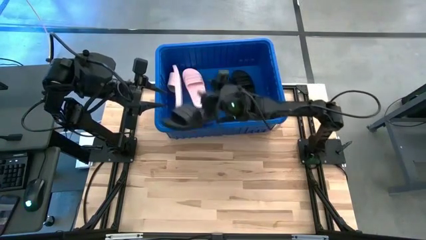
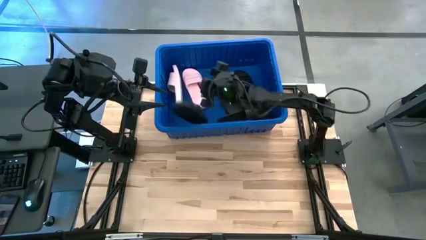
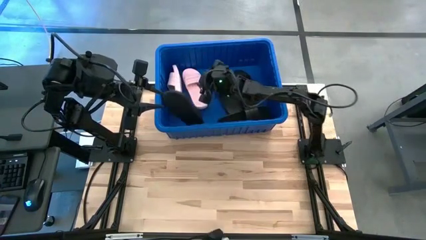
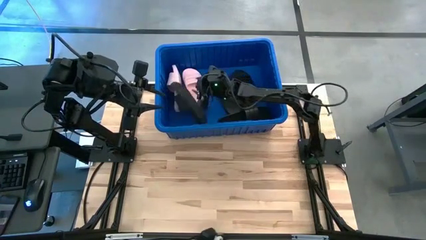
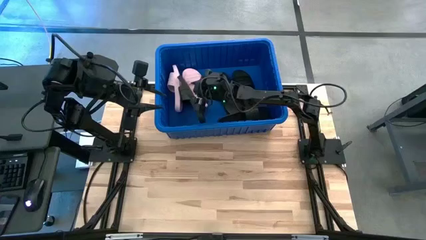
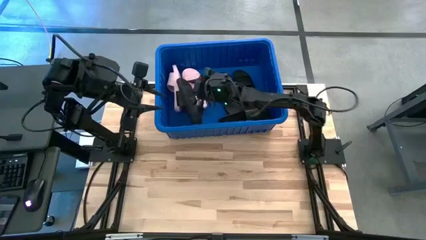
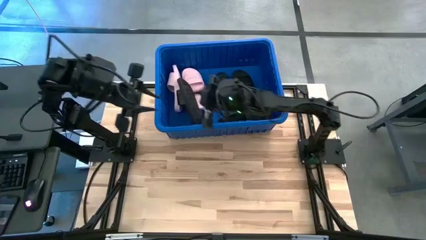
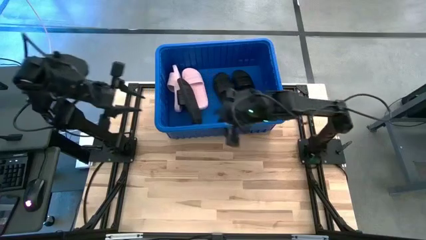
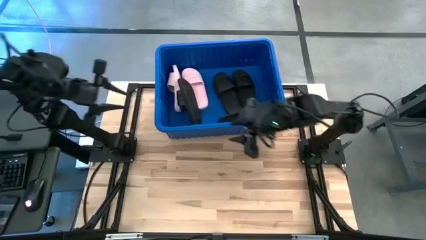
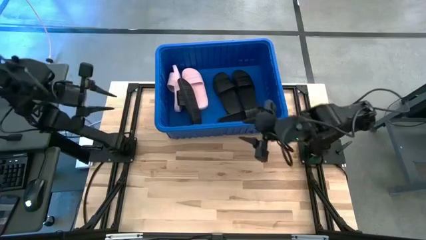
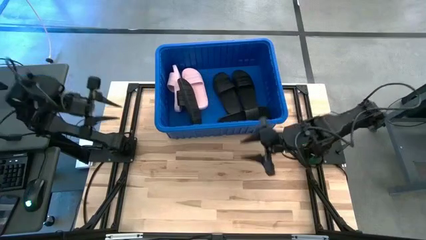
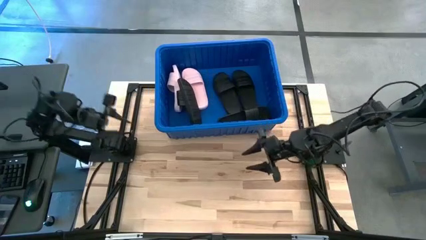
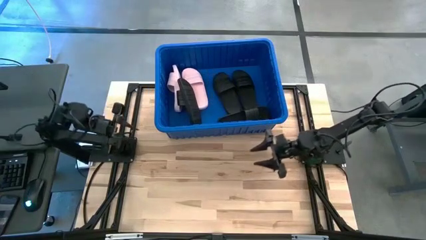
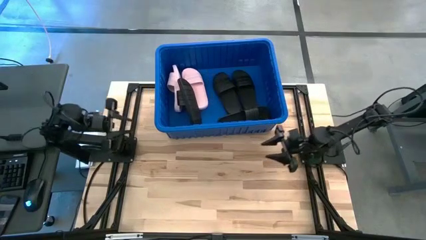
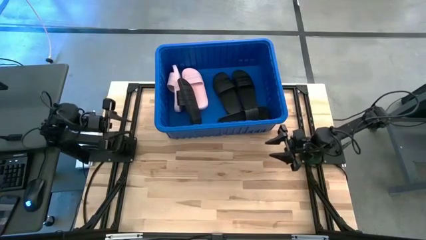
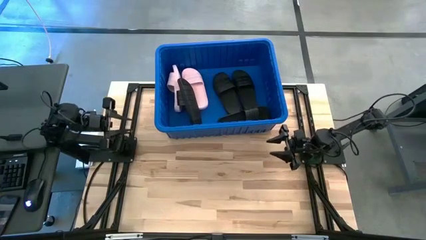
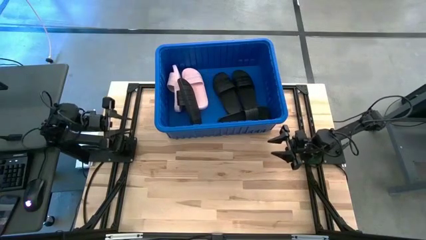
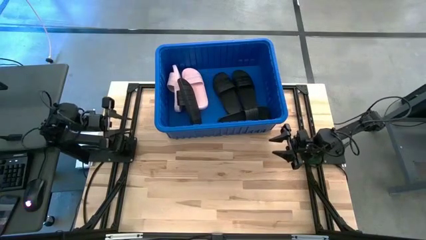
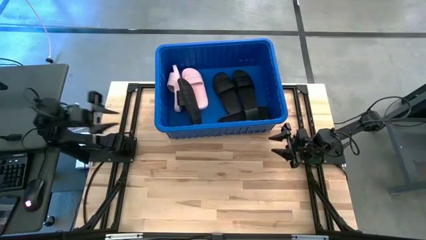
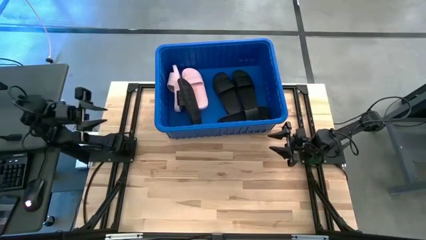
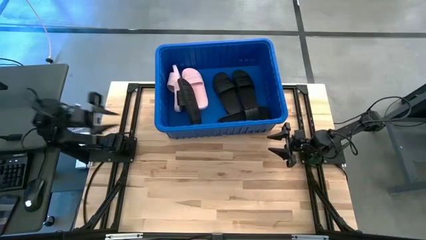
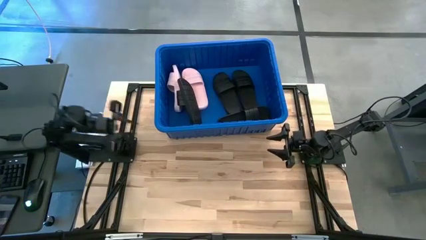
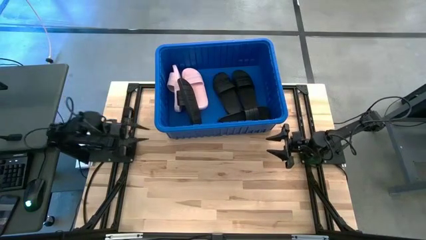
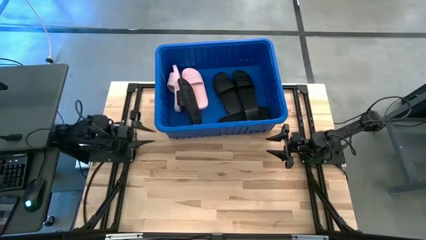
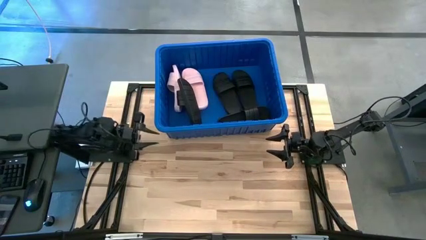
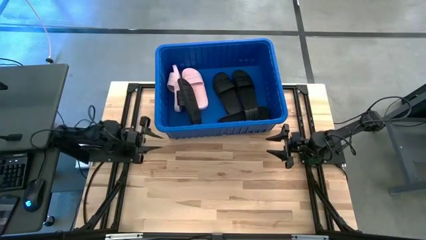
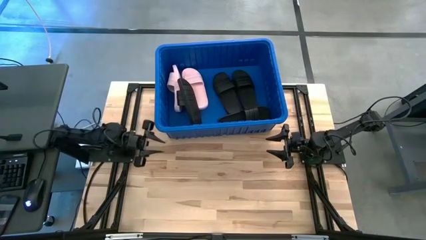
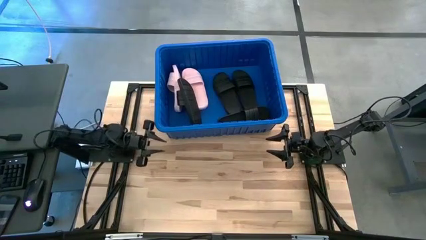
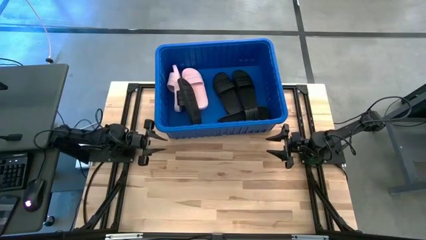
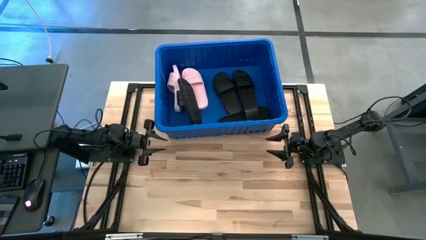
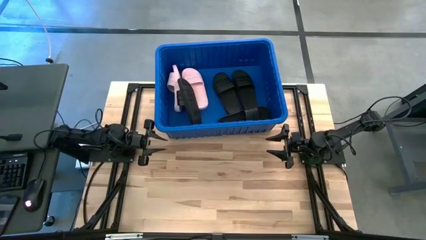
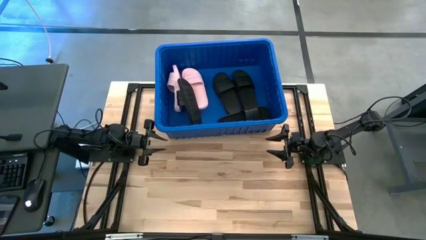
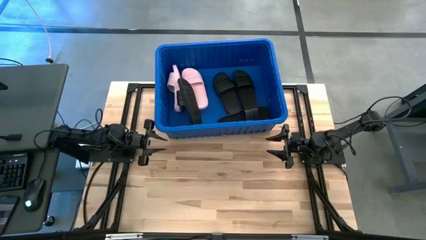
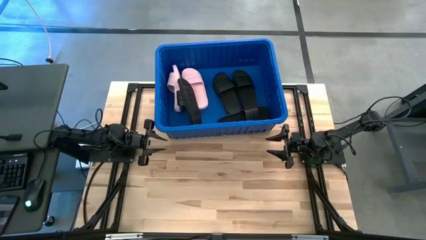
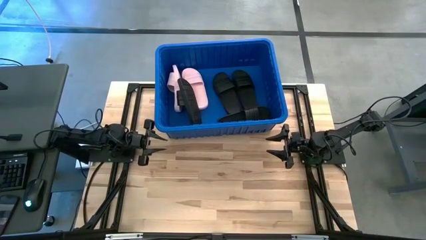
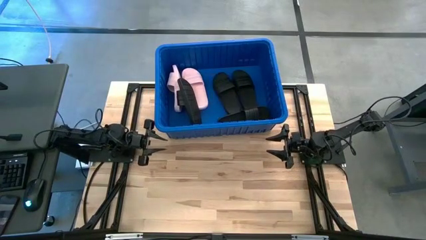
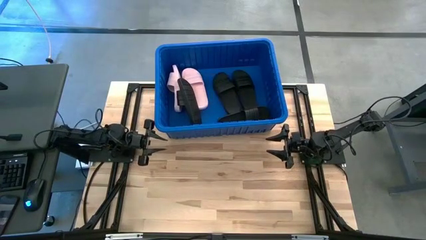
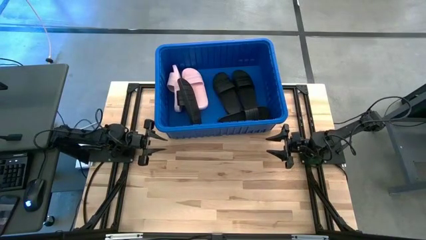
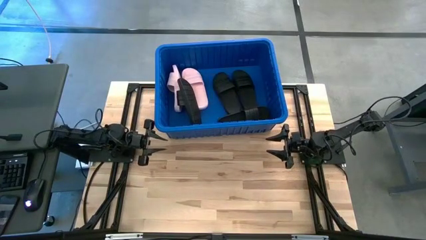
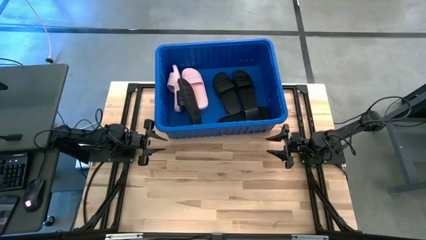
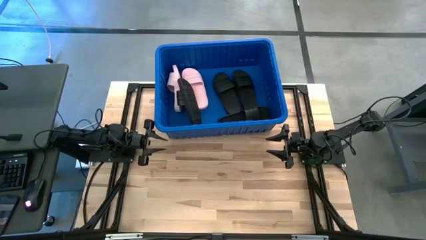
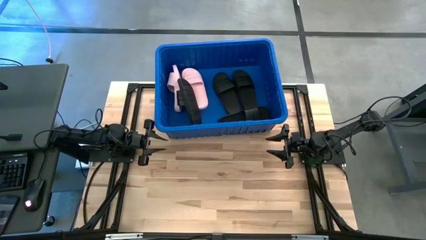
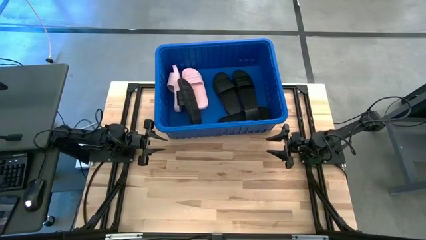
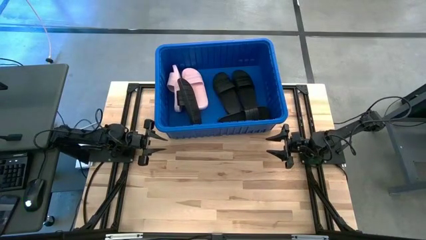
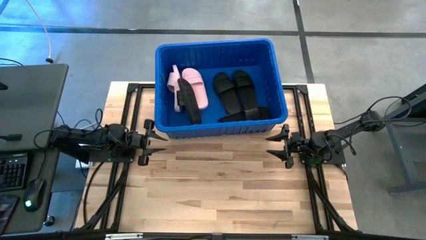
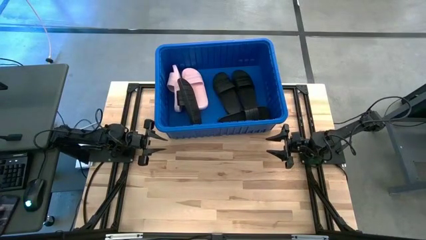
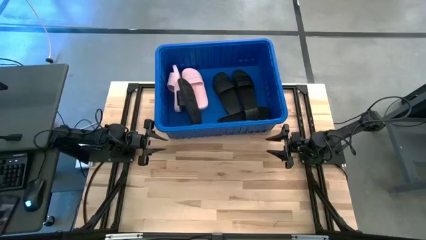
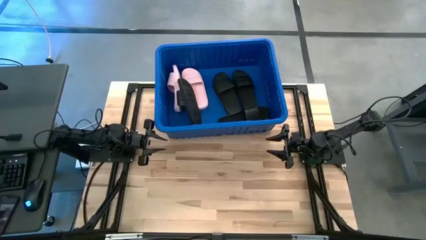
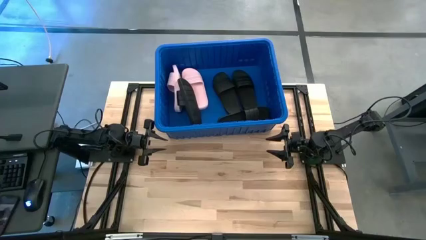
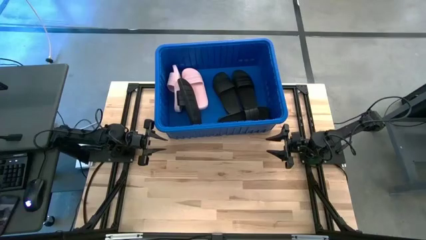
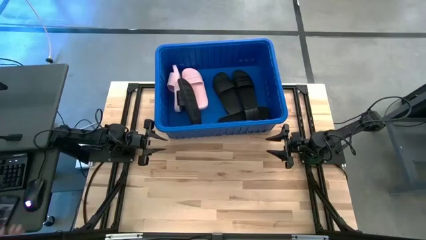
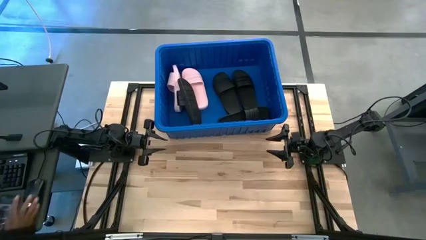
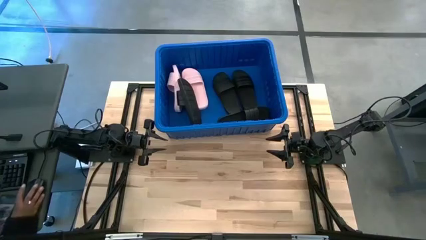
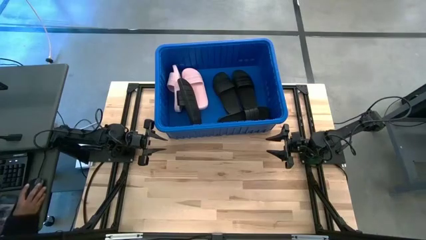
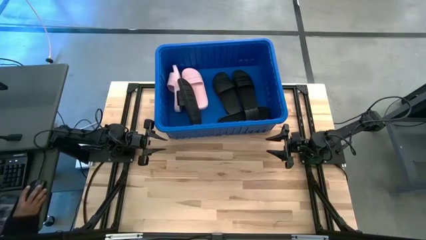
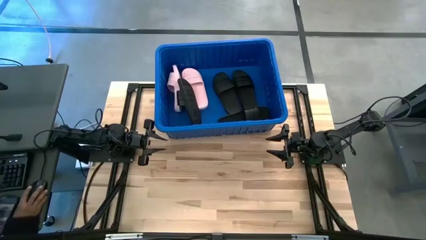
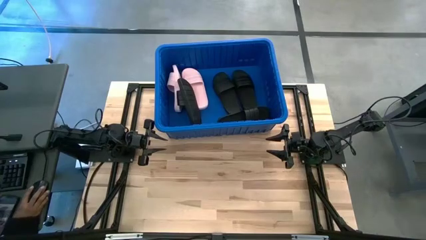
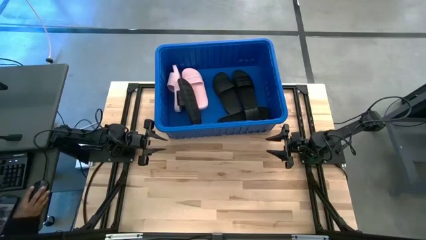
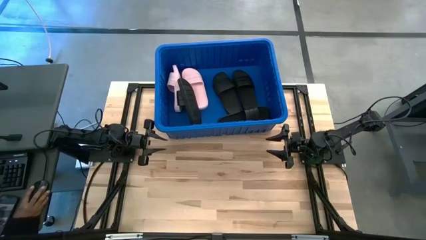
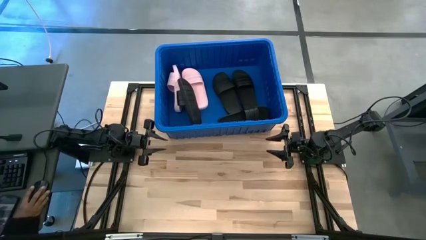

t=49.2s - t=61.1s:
Task: Pick and place slides into bin
Return to Home Position

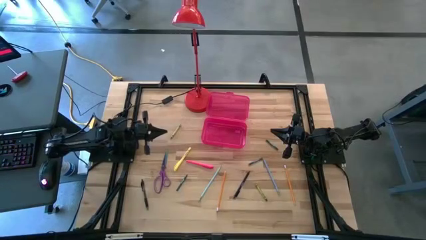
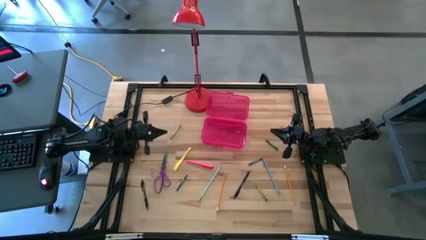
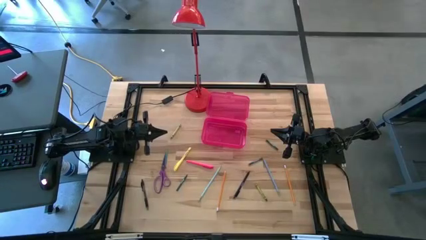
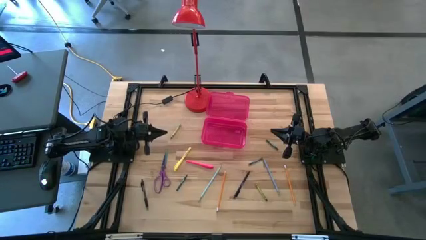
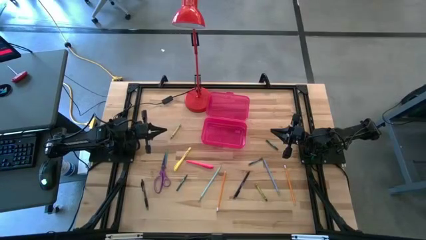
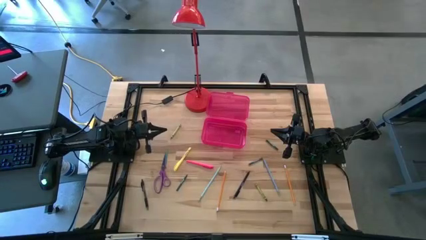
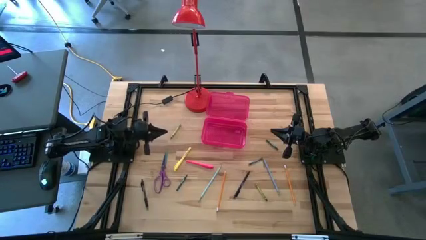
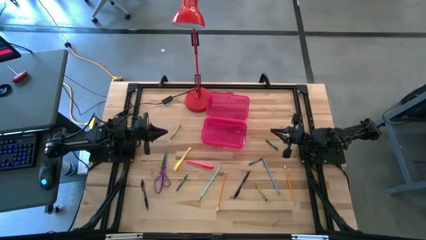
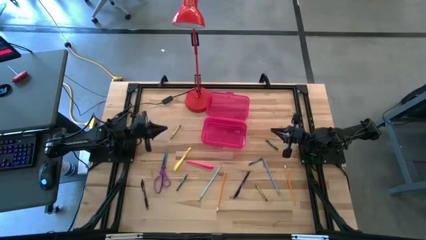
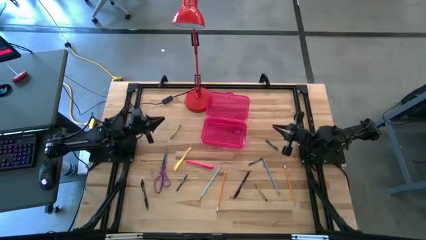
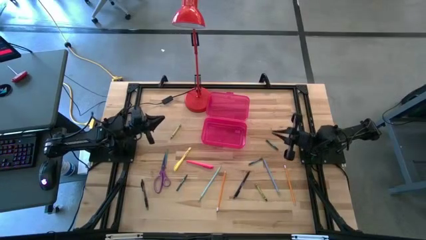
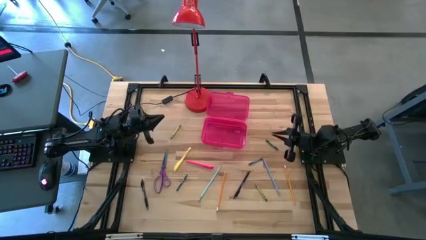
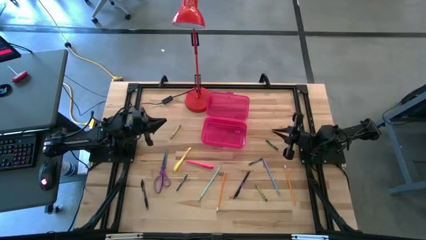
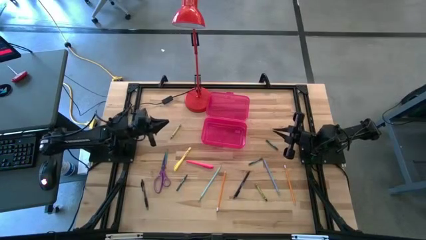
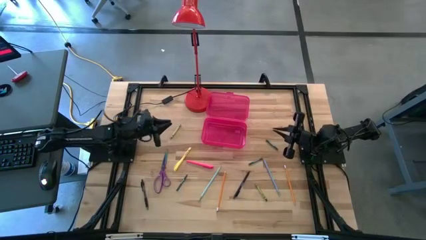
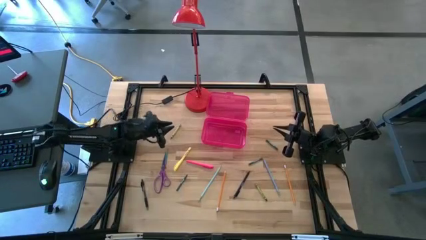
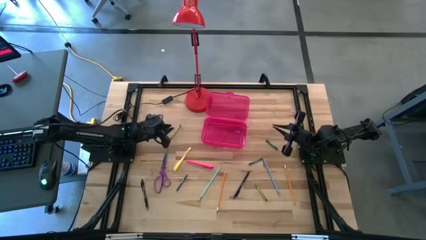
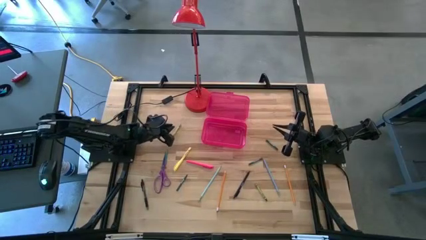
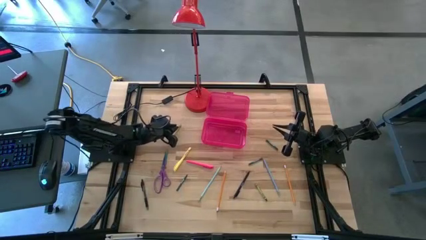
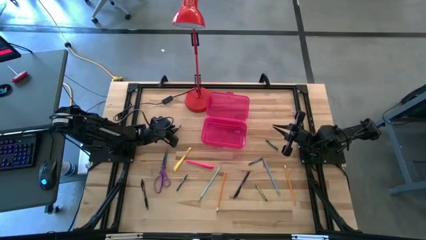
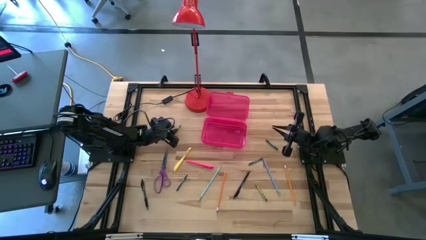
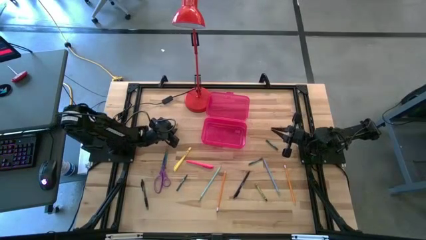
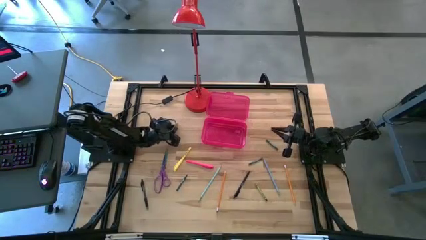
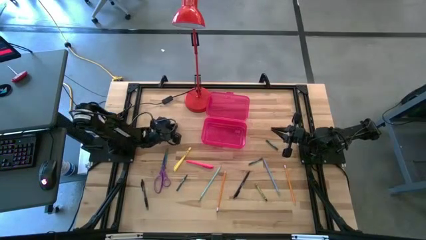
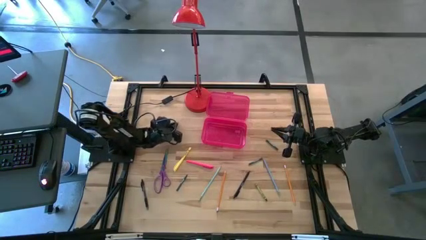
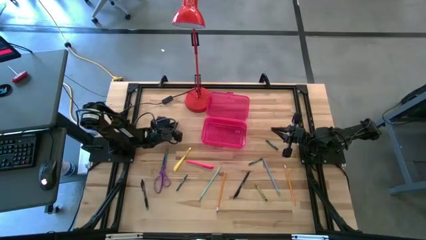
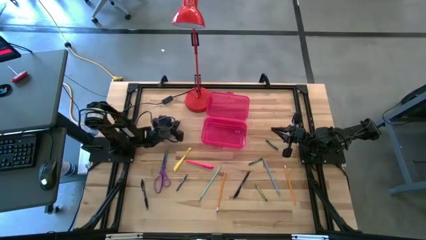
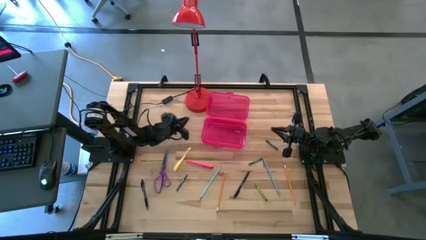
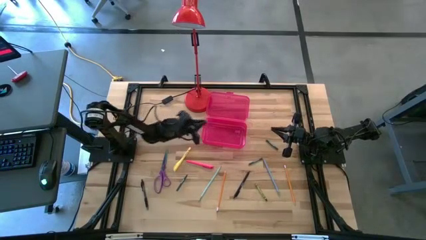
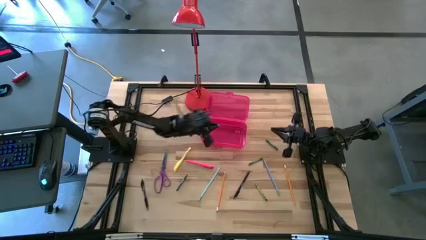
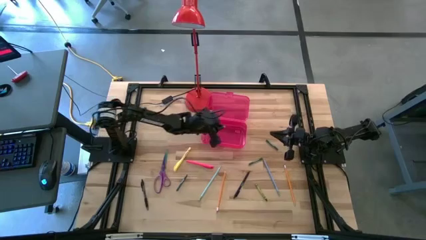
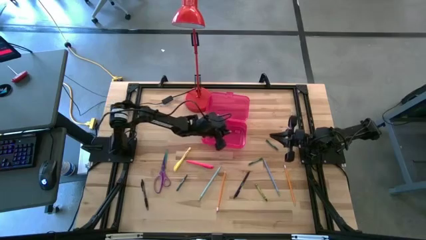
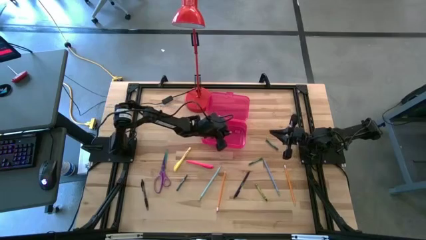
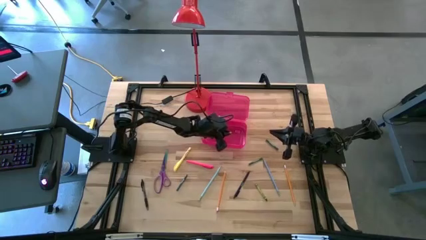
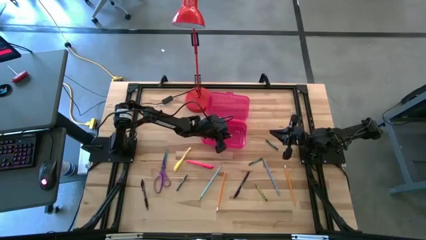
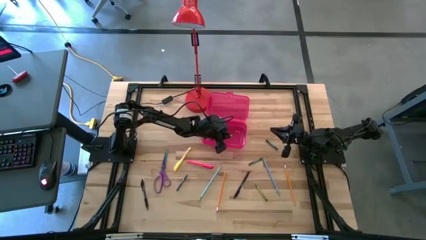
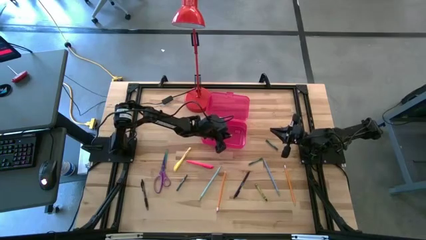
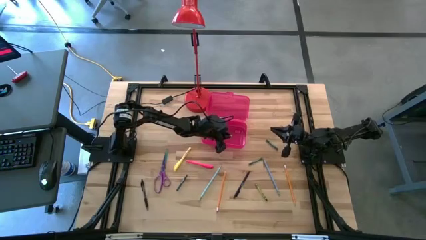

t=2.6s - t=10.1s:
Task: Pick & place school supplies into a supply box
Put the green crayon into the pink supply box
